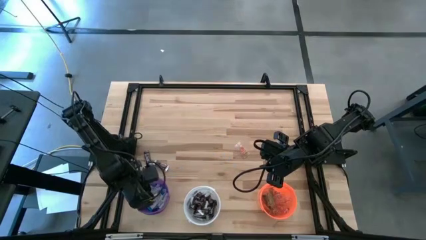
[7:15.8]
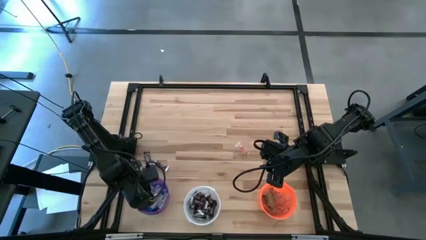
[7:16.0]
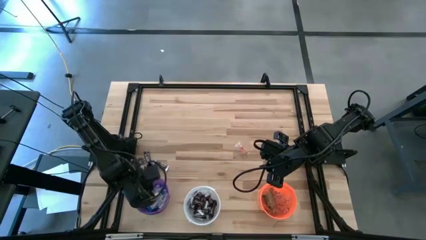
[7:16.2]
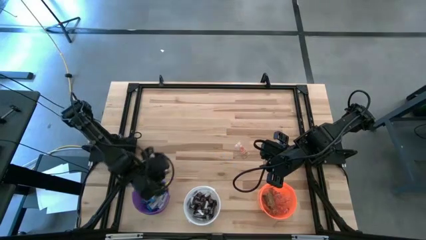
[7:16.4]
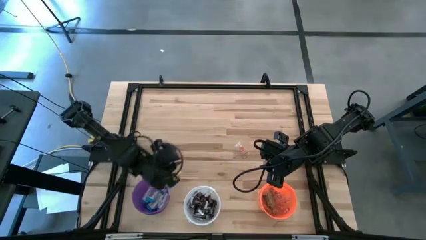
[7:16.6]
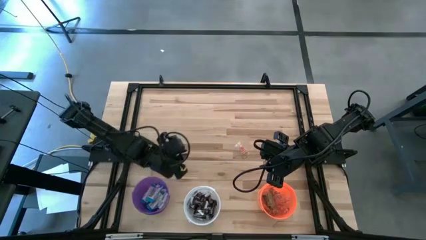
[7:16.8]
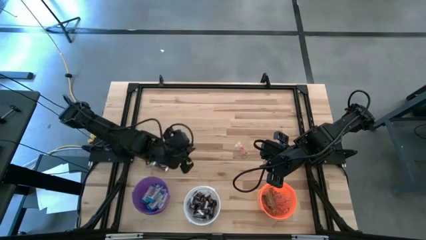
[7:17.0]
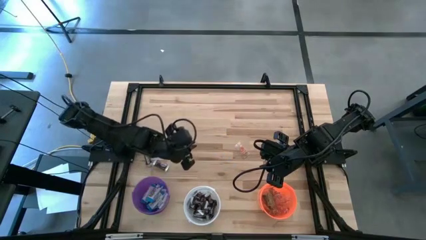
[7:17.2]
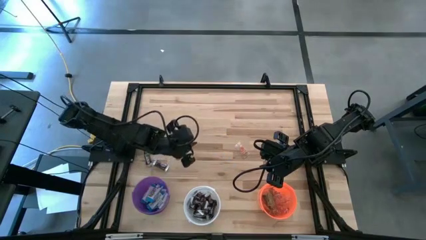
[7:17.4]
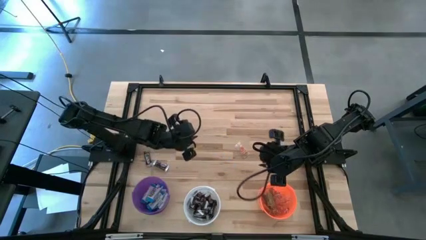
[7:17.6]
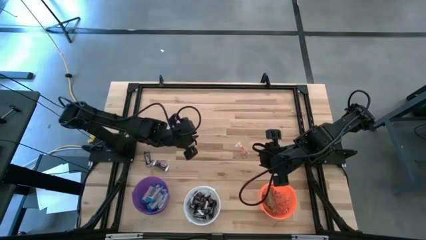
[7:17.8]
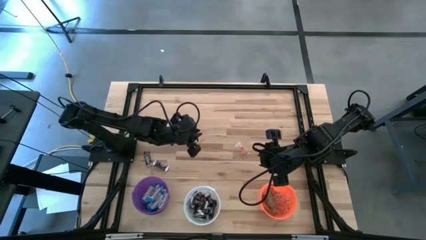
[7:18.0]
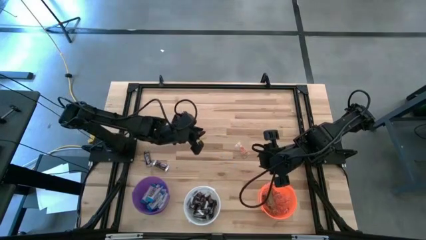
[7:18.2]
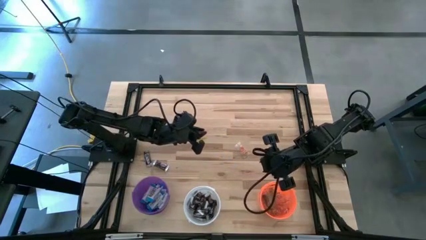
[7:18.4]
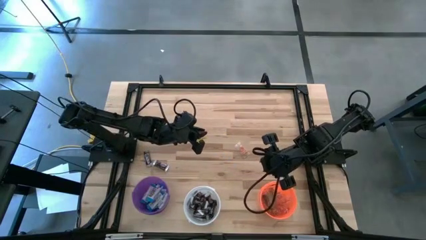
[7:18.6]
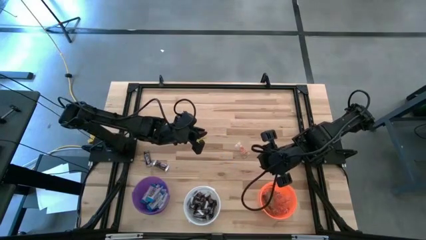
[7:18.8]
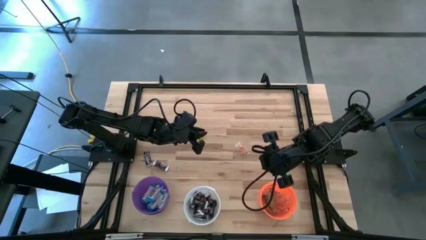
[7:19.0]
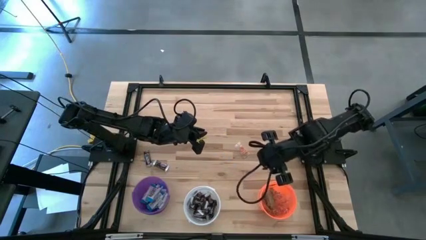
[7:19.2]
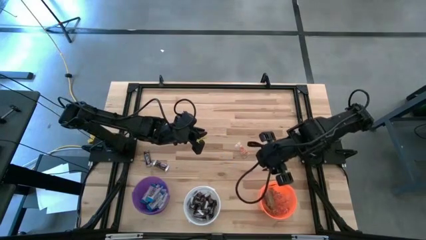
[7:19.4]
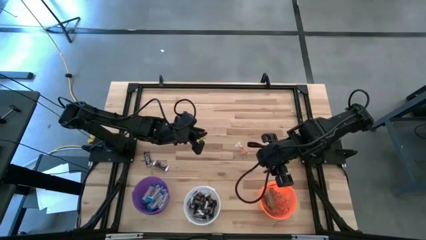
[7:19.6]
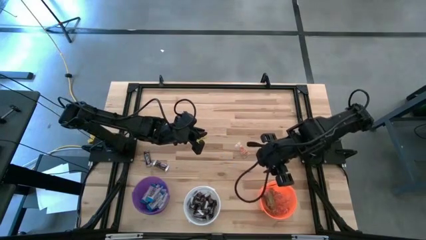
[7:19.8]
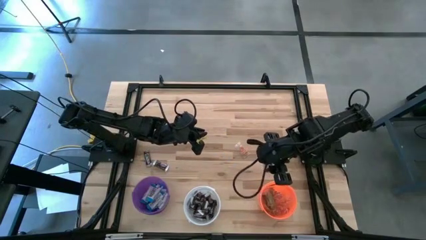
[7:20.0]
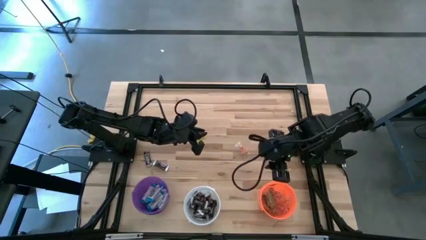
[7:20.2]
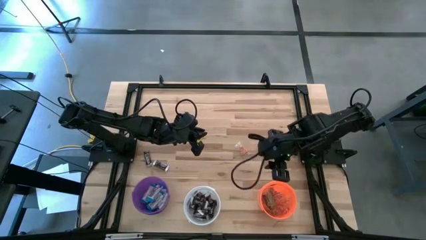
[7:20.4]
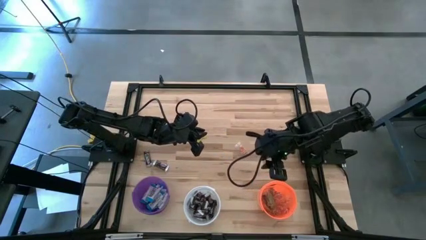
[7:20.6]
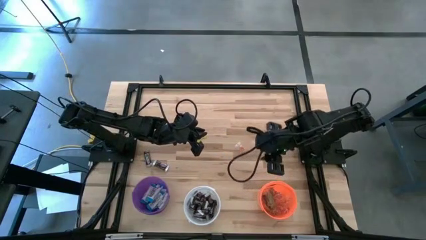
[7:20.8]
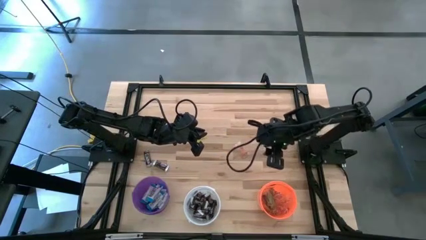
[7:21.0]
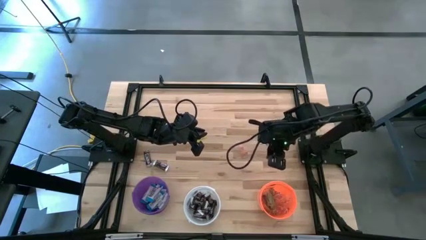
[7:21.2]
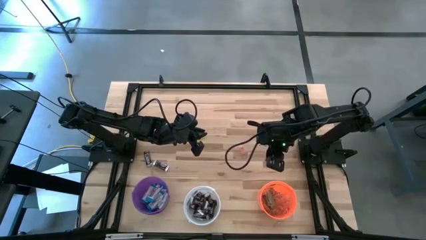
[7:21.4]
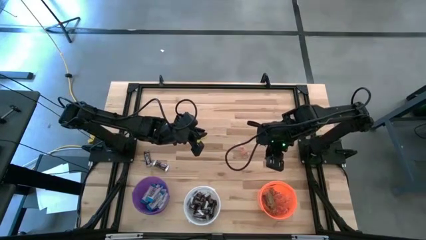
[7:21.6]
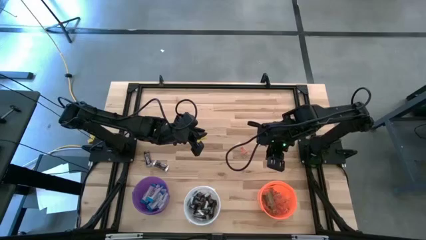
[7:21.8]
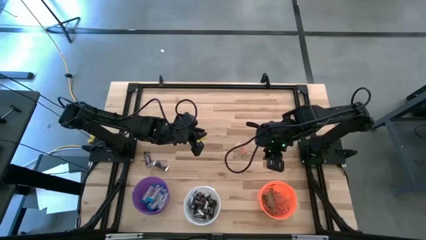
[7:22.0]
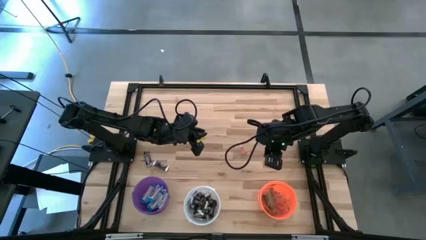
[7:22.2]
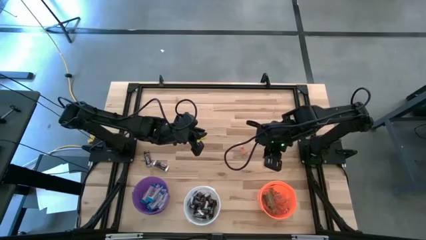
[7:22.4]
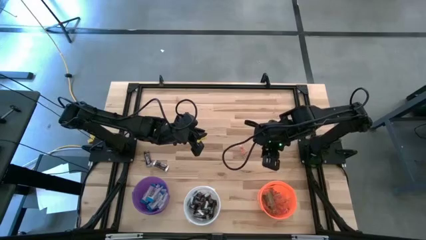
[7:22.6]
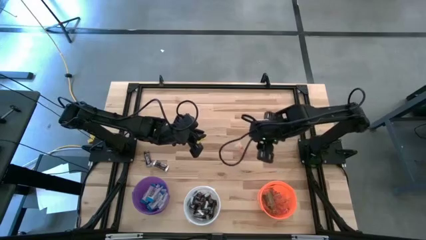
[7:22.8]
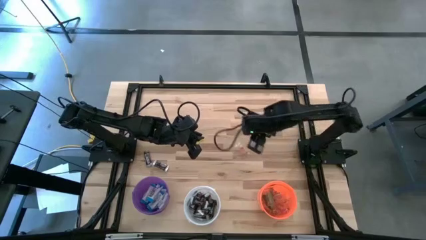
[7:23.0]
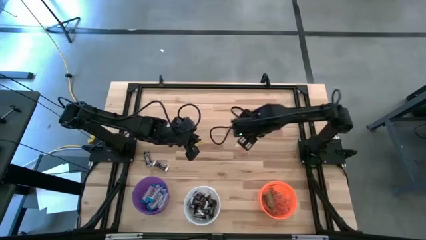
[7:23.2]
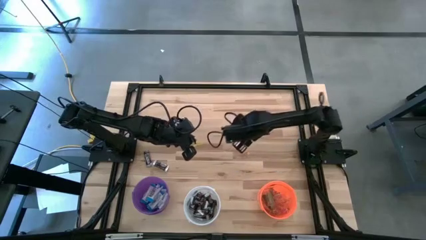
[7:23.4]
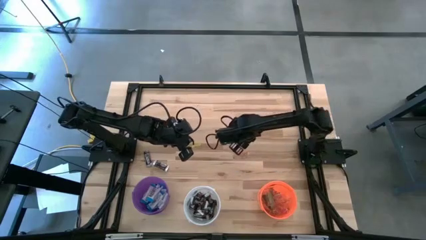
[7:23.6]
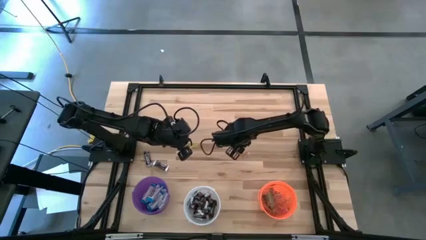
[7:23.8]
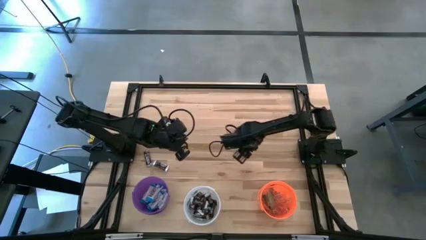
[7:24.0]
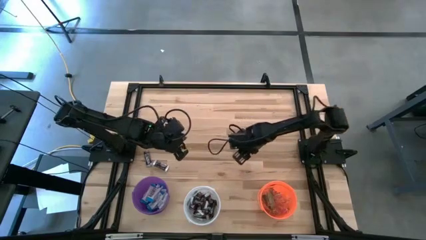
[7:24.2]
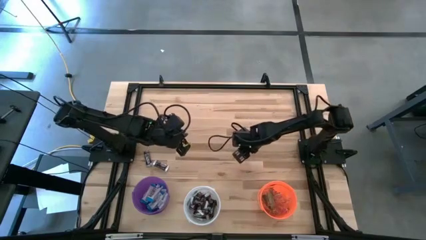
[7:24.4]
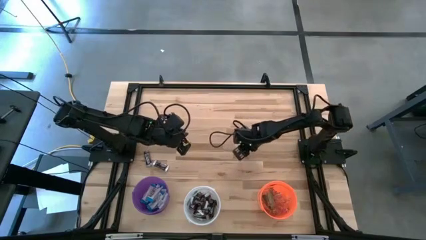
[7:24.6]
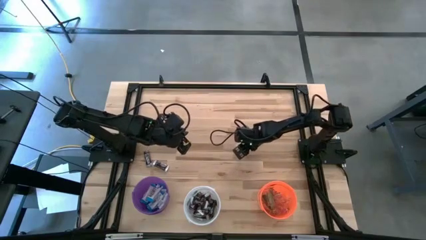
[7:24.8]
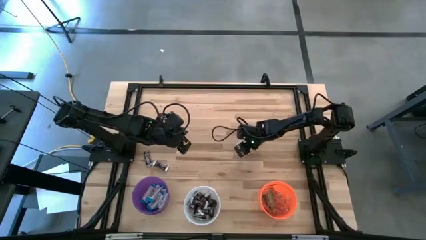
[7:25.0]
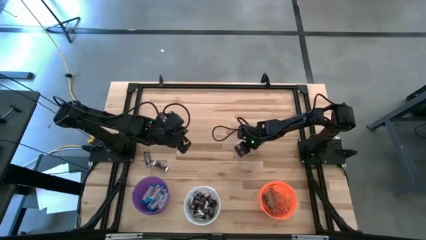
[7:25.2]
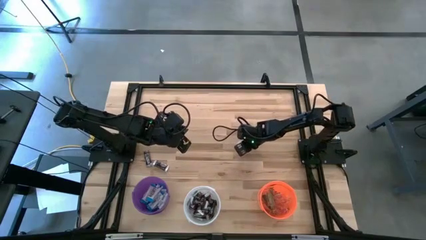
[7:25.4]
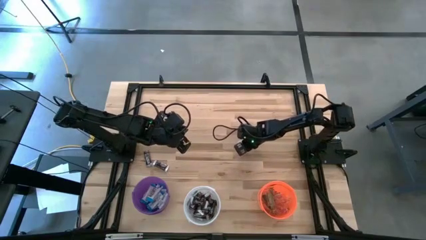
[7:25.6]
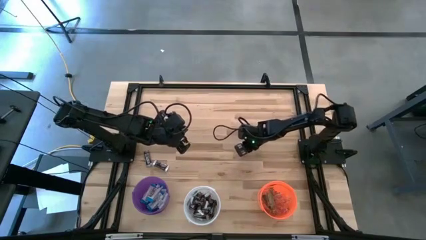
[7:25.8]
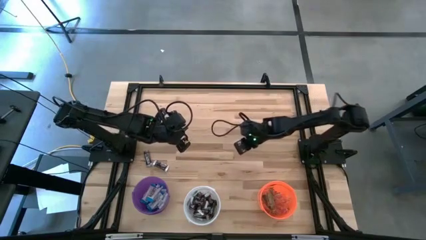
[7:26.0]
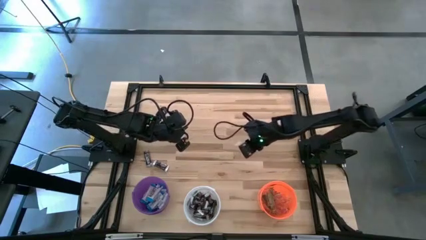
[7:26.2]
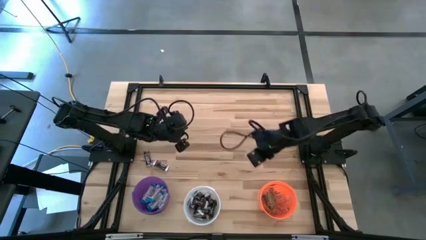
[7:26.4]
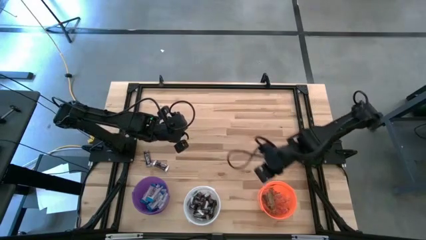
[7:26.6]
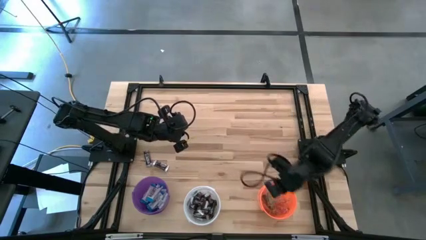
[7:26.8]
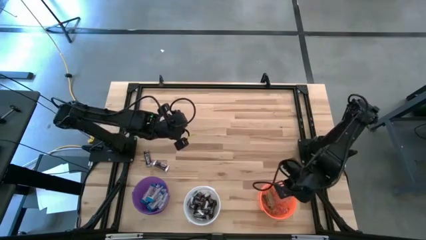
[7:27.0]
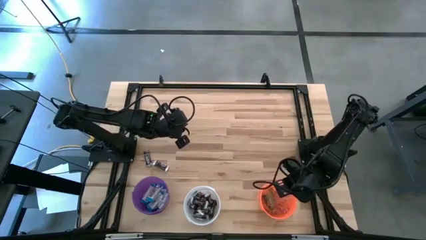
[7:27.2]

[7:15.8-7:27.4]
Task: Sort candy
Put the orange gummy into the orange bucket

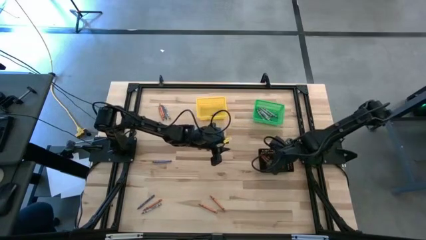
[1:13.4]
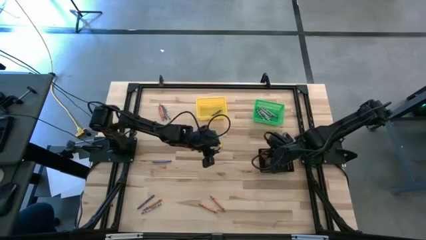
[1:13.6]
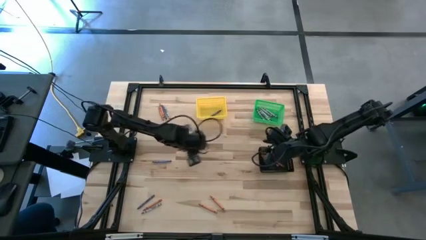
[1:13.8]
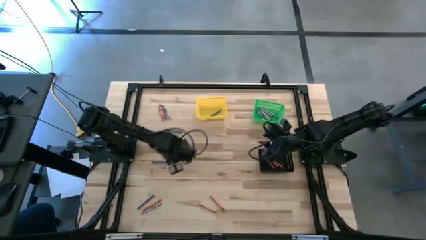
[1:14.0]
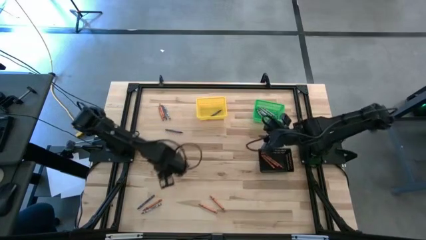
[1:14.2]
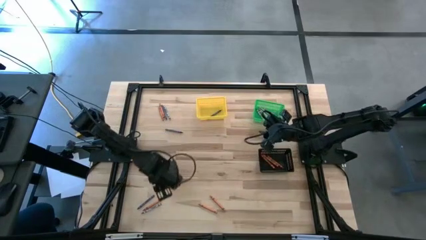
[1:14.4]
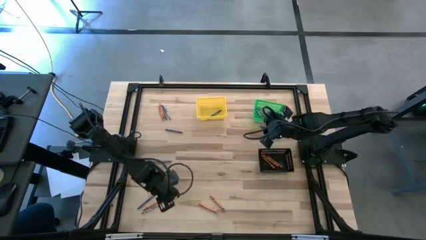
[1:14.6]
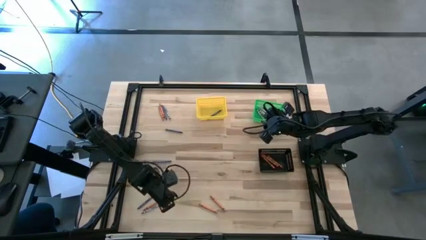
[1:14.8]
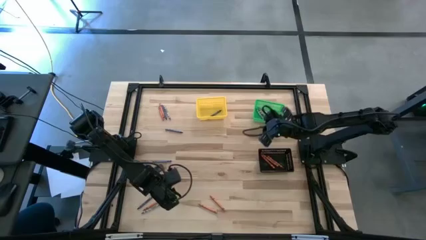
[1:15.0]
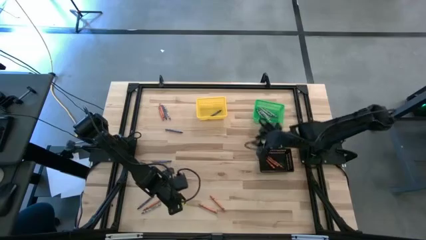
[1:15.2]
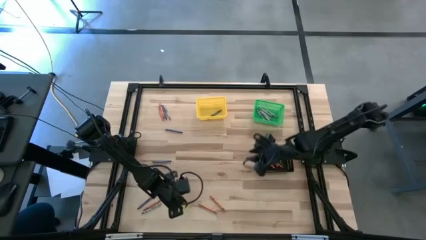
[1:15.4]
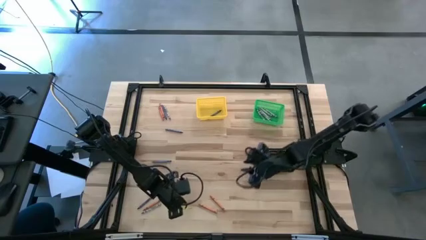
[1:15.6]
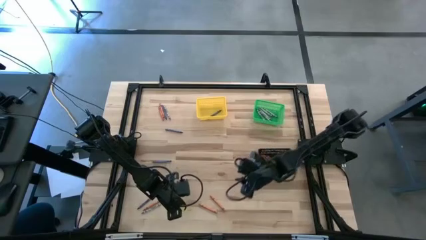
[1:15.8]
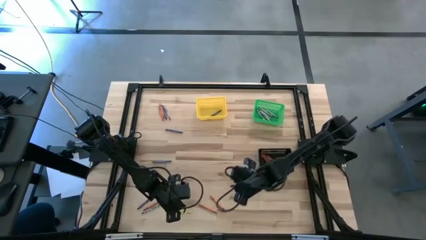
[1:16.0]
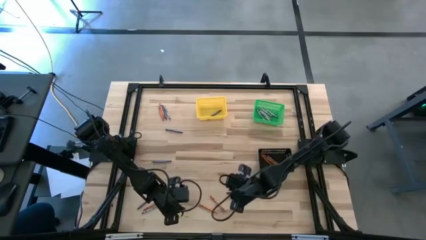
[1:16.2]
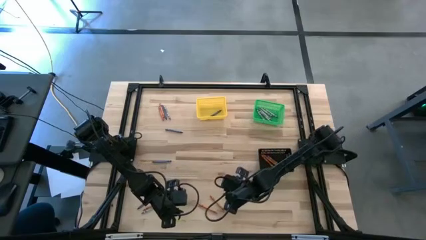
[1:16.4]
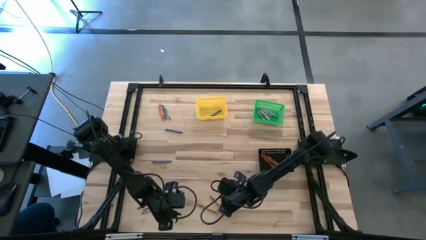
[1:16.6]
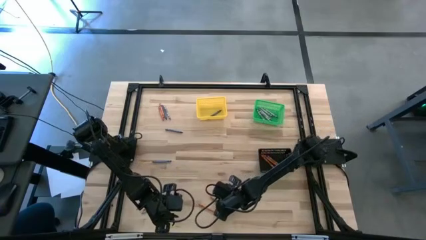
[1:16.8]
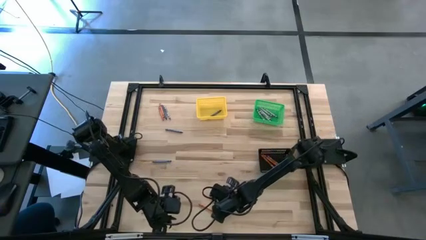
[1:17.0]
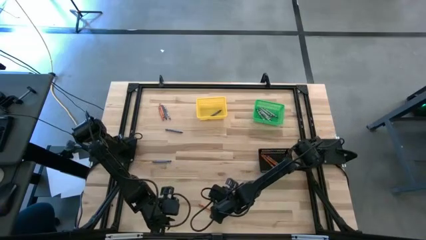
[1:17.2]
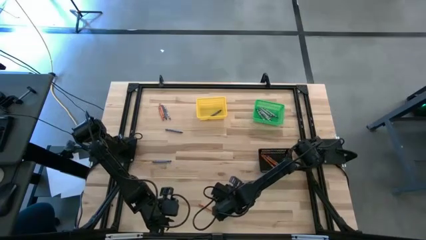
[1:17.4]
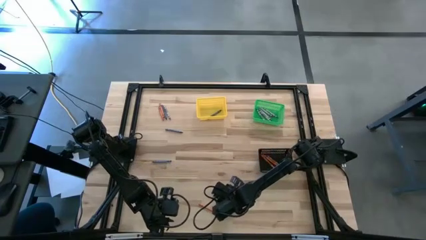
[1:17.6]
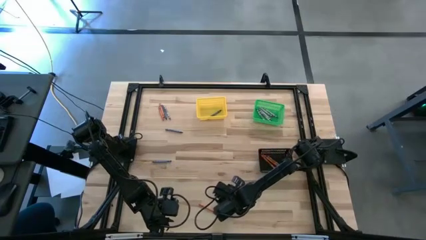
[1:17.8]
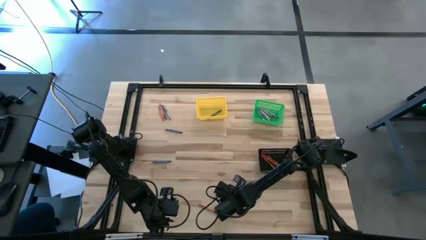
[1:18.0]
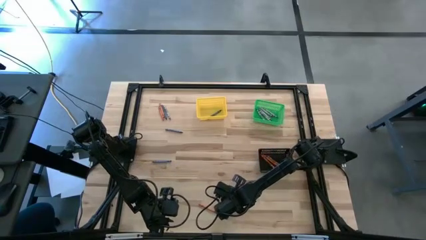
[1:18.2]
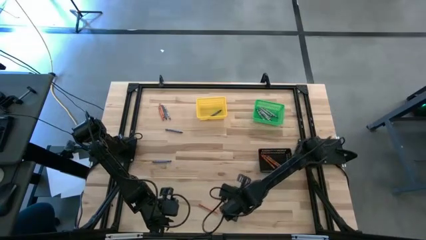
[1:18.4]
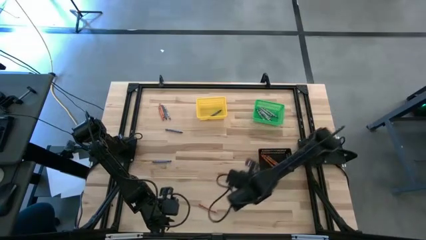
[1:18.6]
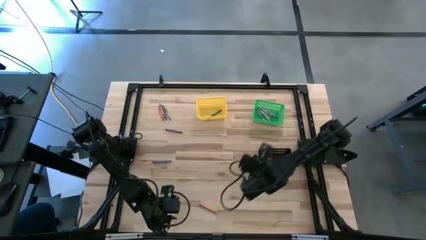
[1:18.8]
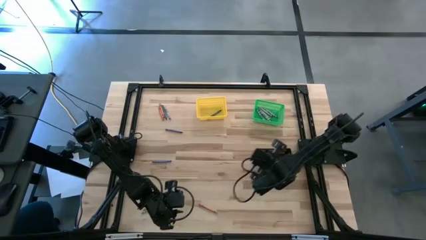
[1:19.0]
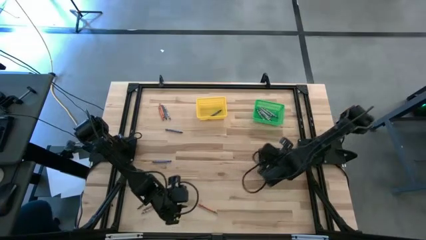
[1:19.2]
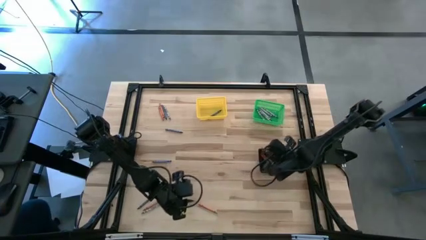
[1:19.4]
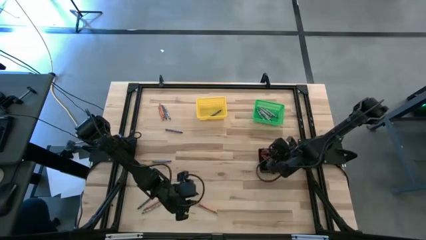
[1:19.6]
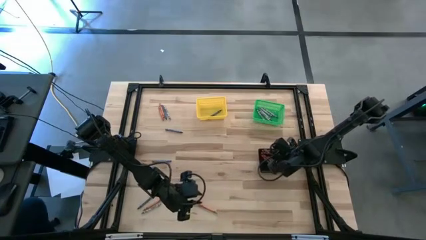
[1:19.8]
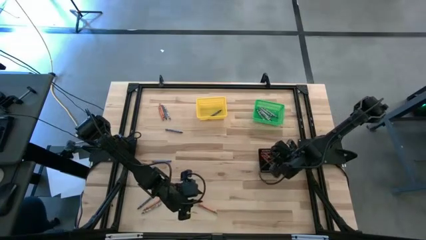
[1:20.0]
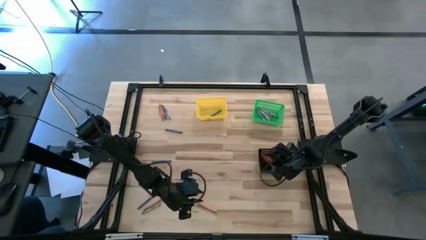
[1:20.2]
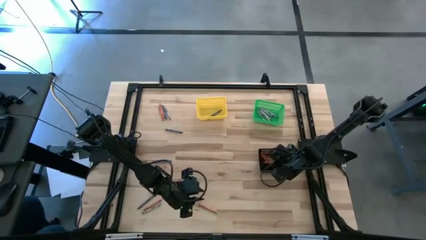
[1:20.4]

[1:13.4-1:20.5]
Task: Sort crayons
Put the orange crayon into the black basket
